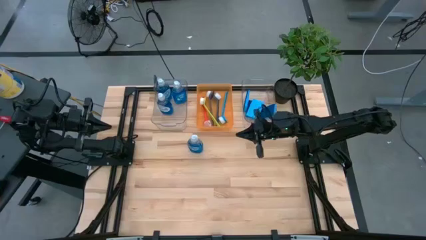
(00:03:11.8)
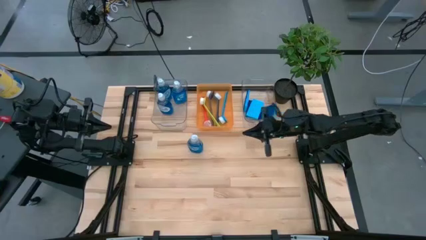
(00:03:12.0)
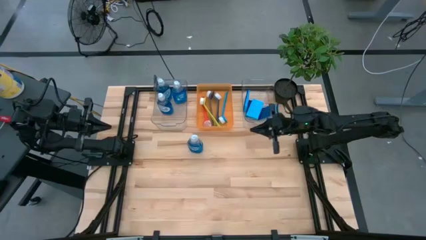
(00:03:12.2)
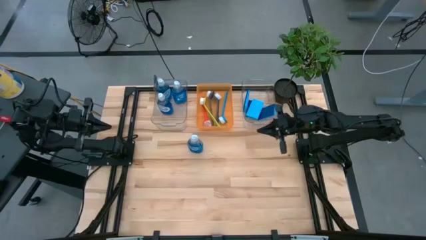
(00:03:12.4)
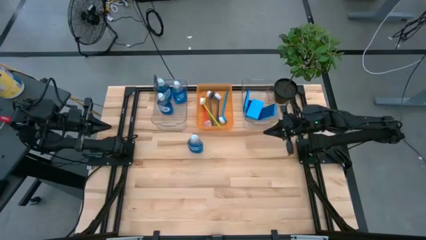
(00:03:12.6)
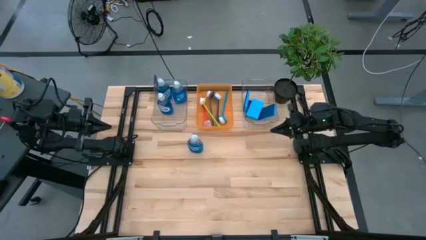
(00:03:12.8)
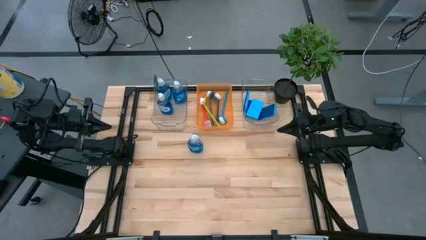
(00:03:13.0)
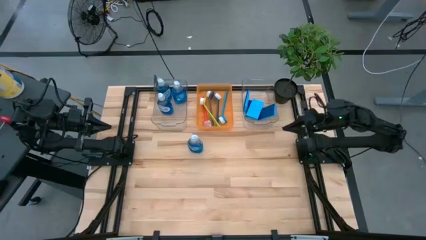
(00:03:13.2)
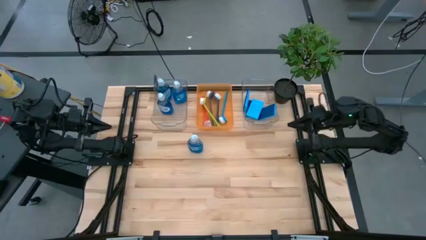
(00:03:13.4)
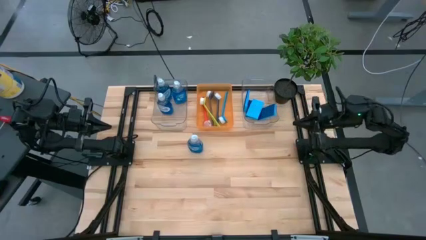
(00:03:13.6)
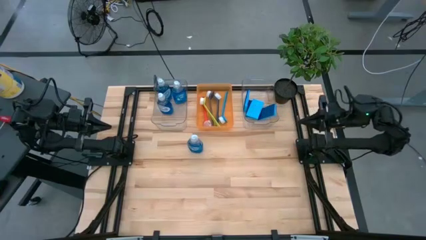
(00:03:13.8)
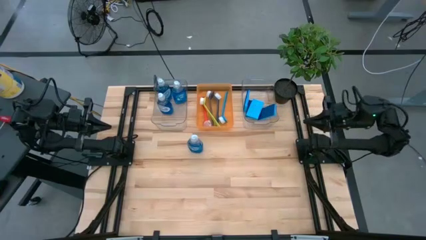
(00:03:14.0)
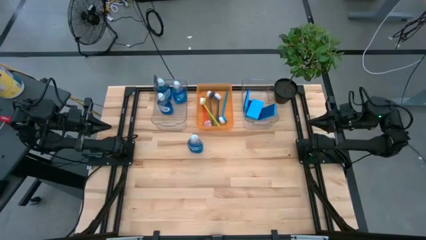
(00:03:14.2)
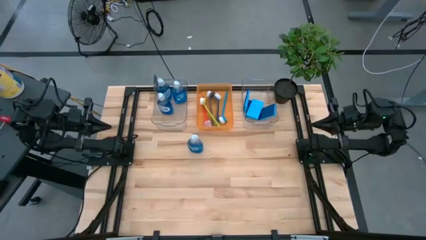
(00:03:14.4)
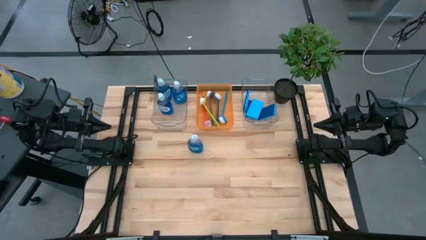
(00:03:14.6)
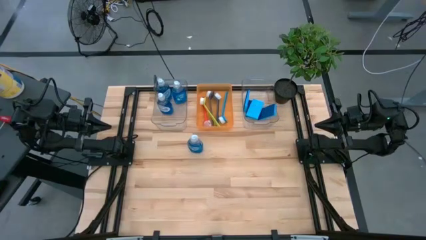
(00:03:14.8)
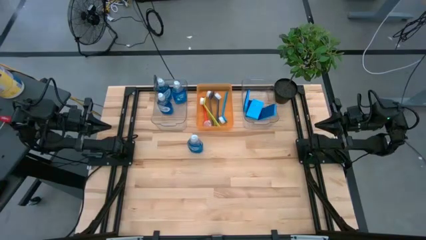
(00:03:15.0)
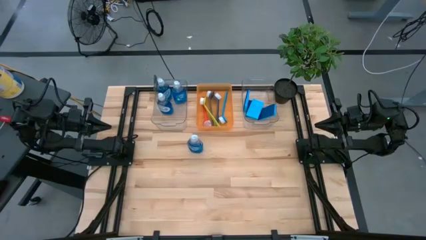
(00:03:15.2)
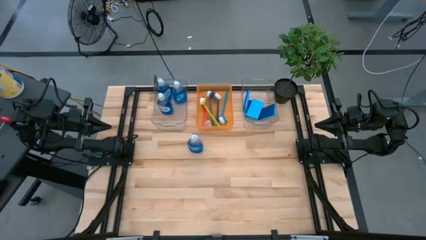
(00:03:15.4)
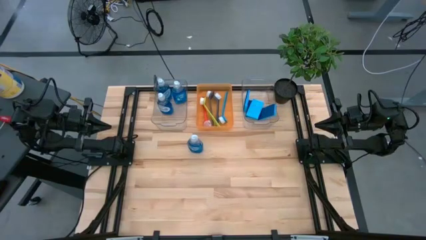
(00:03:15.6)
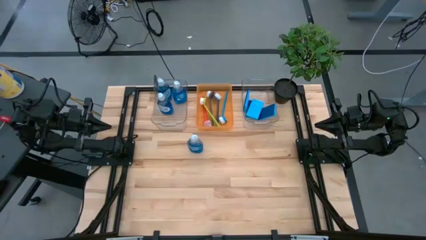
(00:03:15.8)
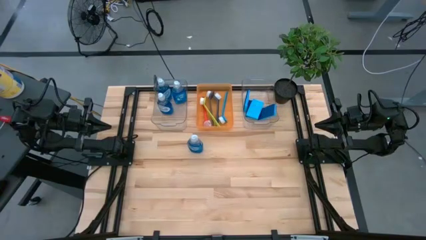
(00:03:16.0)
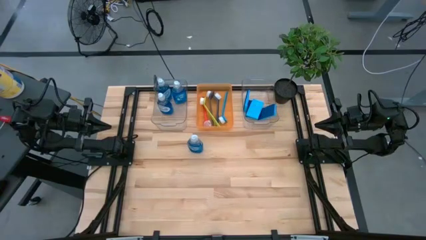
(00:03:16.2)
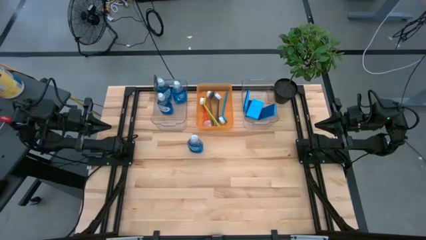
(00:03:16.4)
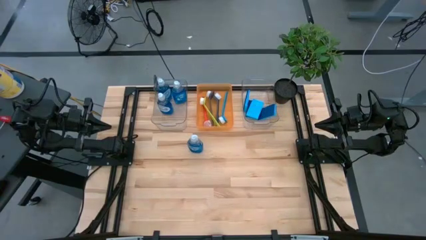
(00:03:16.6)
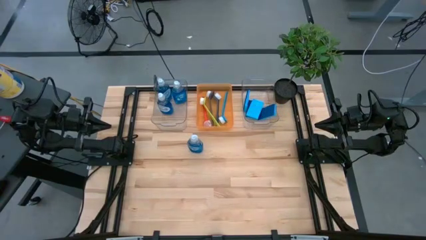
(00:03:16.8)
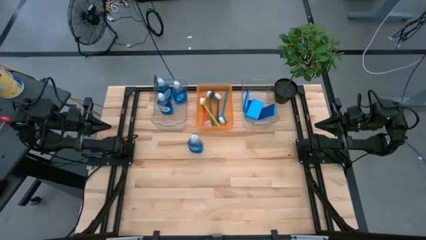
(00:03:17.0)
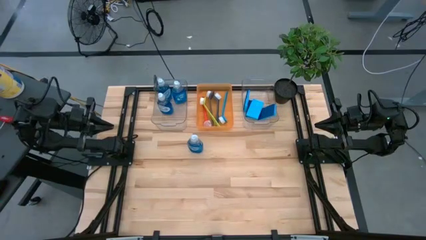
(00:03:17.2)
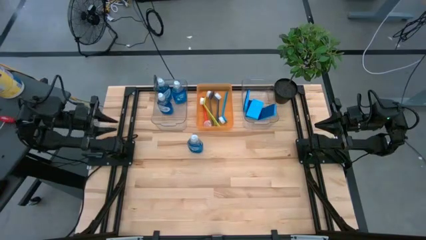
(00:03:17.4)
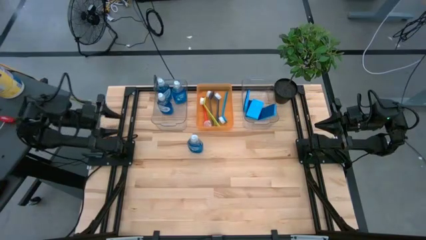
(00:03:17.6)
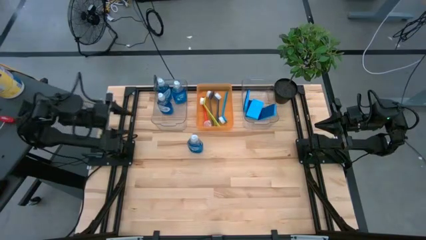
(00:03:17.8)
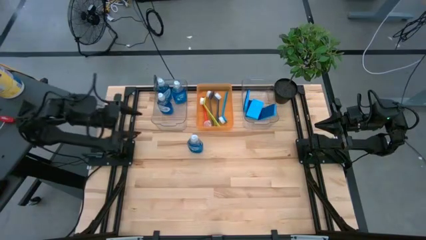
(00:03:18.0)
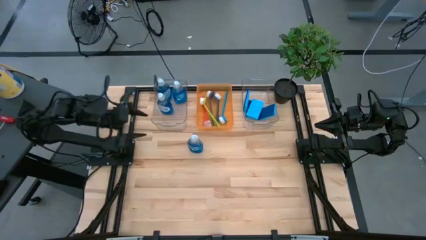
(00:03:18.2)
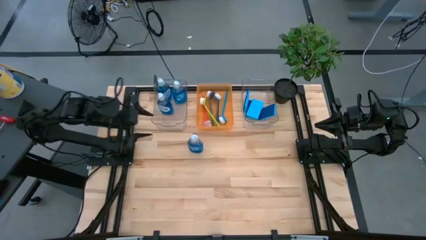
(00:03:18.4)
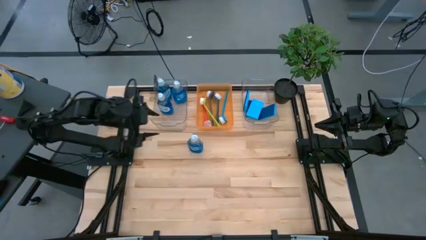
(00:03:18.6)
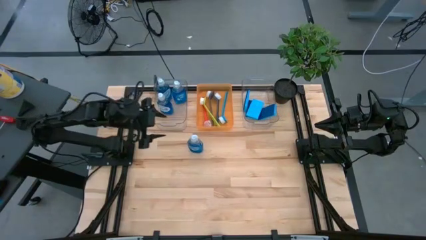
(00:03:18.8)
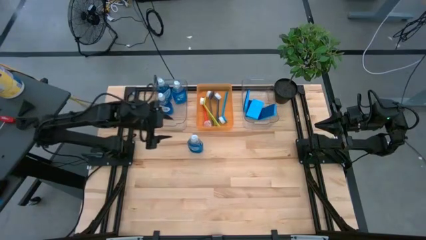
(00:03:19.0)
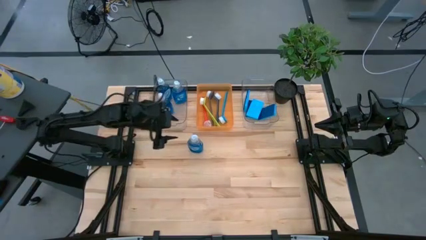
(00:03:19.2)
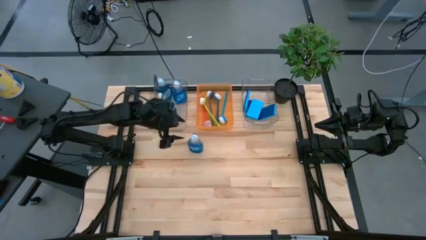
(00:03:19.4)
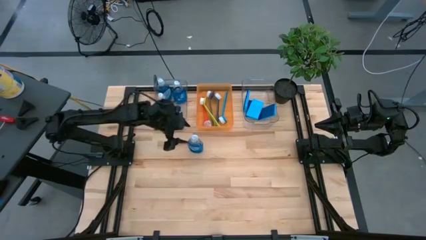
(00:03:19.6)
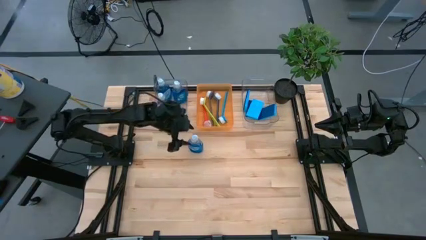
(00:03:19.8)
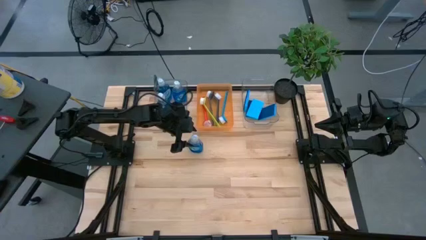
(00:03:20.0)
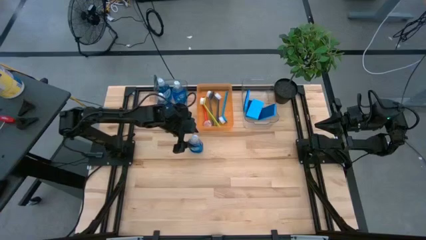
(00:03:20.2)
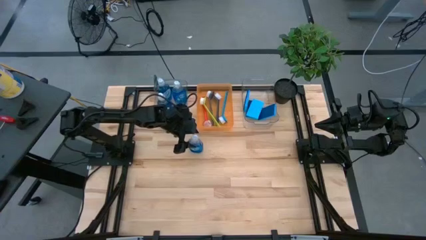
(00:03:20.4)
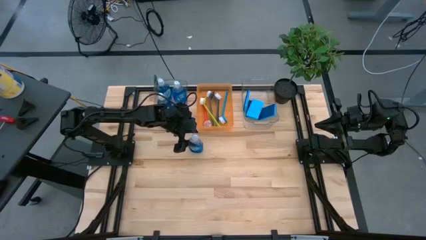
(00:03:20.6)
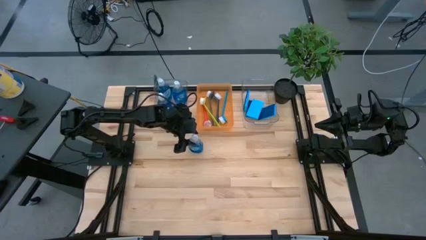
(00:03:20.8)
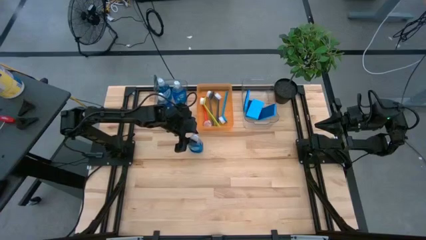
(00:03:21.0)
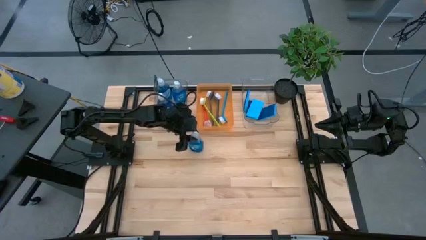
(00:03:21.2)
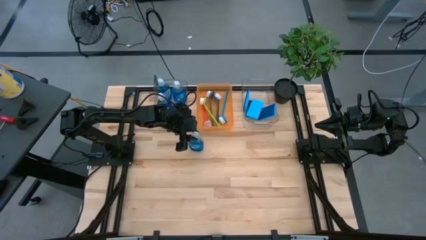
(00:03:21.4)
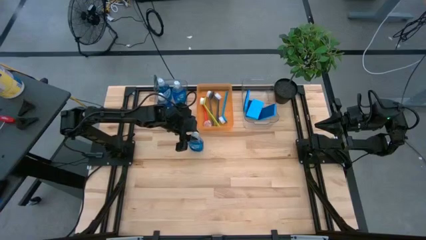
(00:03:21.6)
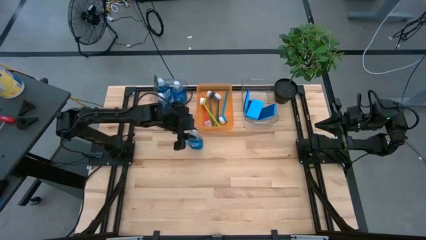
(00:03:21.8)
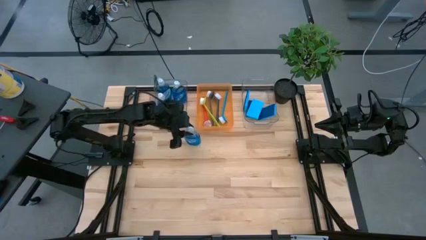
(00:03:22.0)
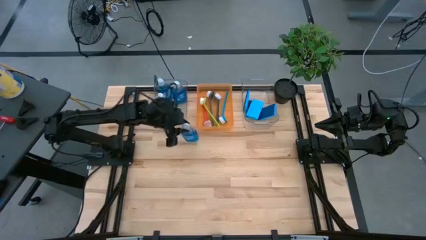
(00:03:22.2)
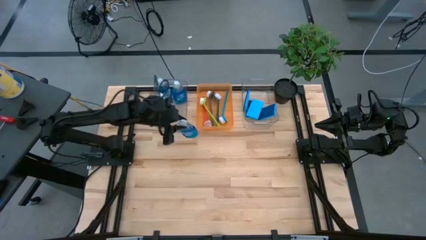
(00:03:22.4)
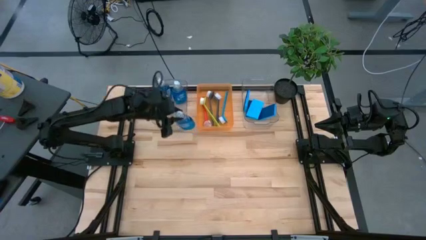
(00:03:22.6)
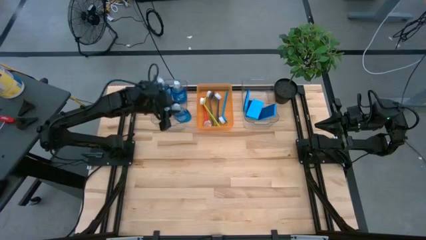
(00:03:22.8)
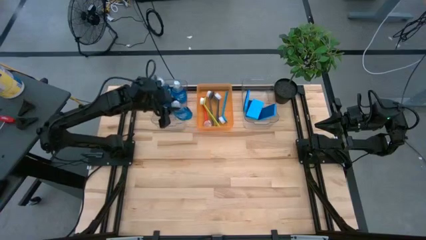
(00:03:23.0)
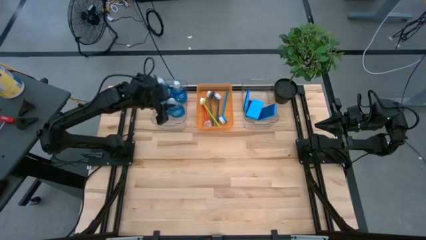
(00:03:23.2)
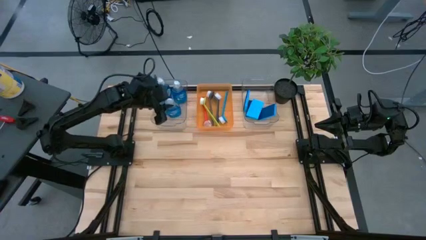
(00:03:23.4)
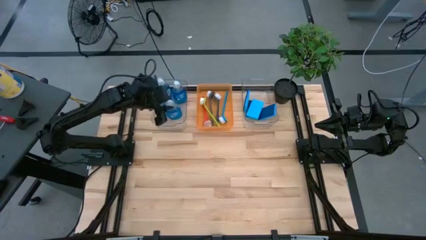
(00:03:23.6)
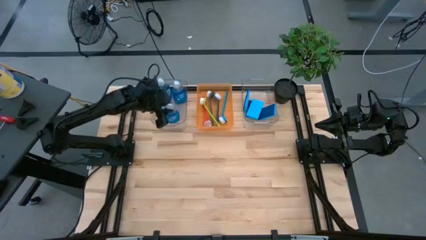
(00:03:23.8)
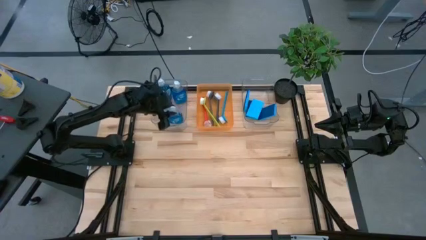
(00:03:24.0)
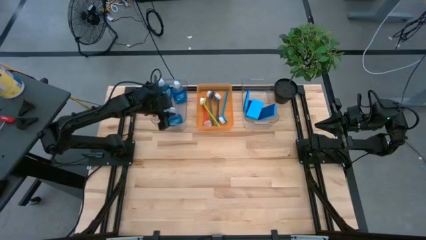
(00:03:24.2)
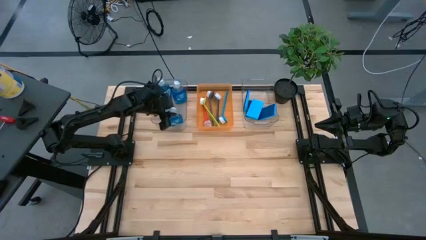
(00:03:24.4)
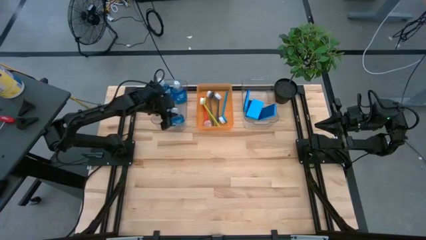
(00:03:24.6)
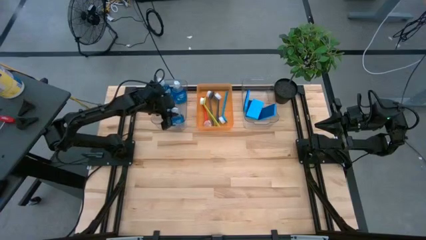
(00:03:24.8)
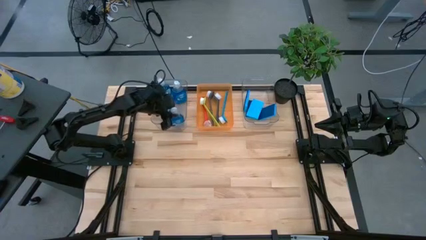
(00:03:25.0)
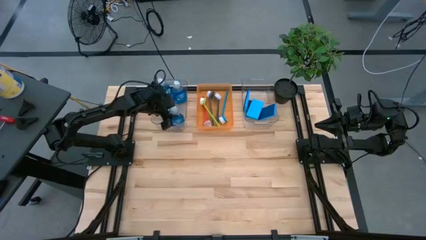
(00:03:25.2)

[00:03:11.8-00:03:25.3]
Task: Pick & Place Kitchen Sink Supplies
Put the dish soap into the left transparent bin
